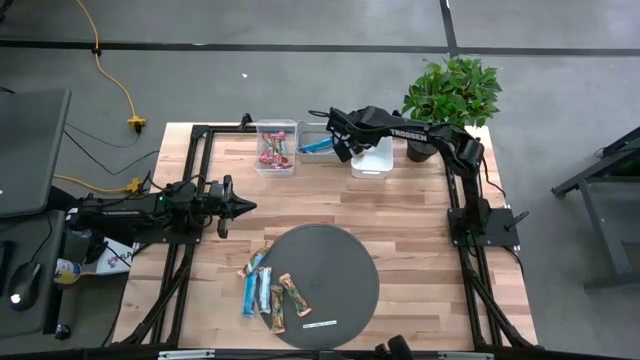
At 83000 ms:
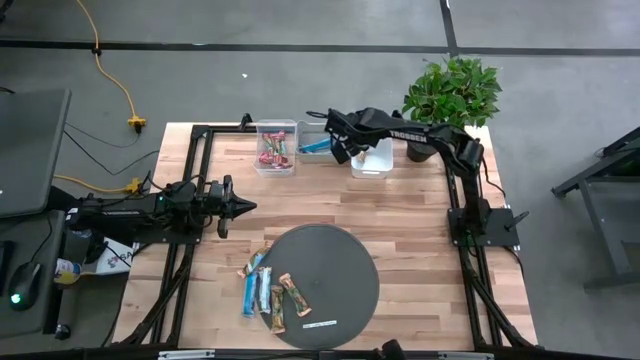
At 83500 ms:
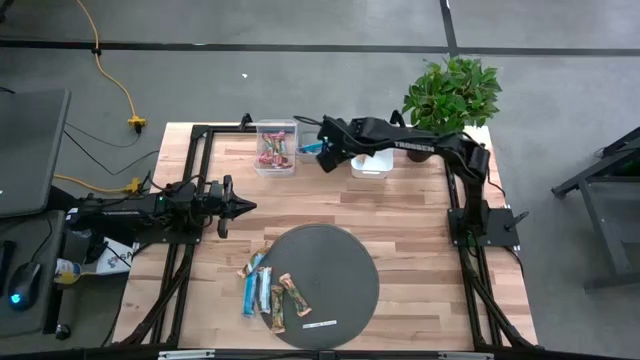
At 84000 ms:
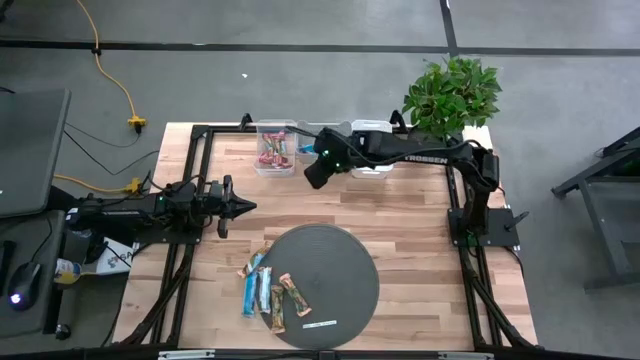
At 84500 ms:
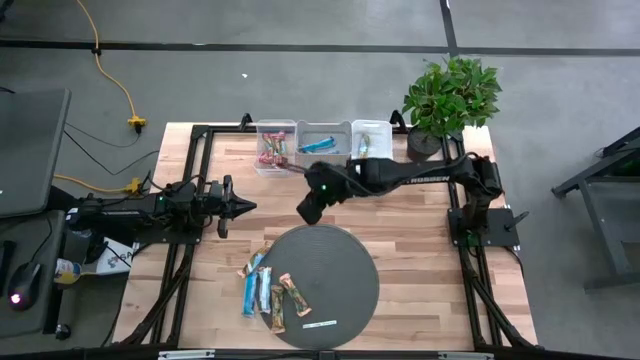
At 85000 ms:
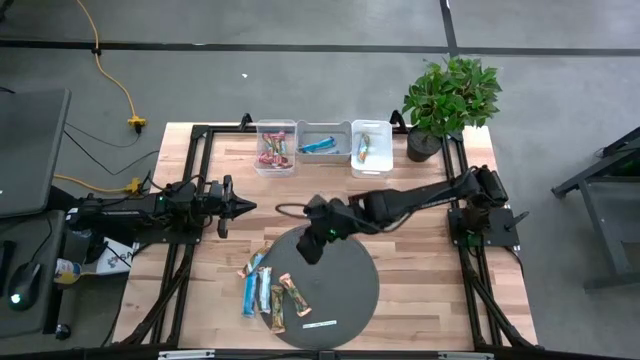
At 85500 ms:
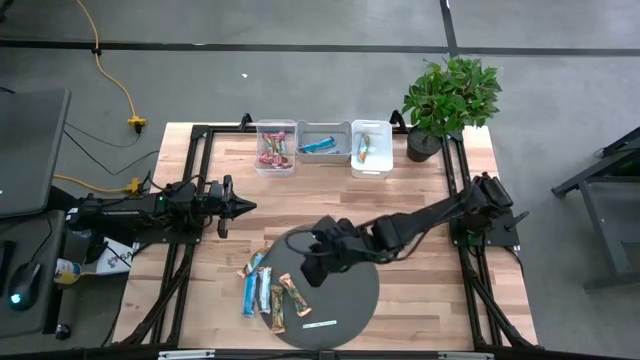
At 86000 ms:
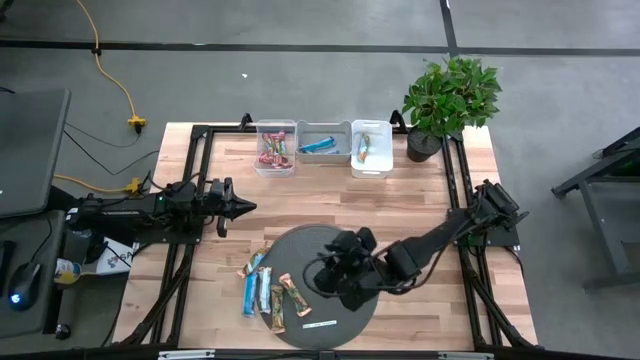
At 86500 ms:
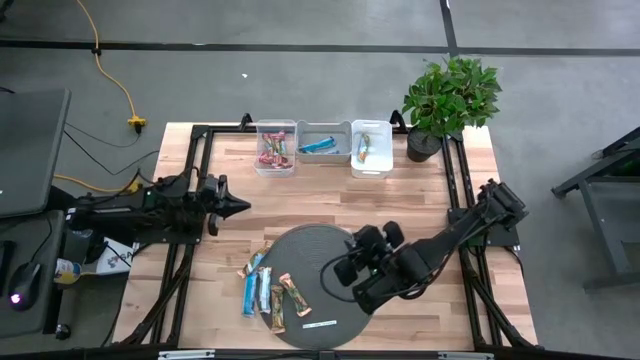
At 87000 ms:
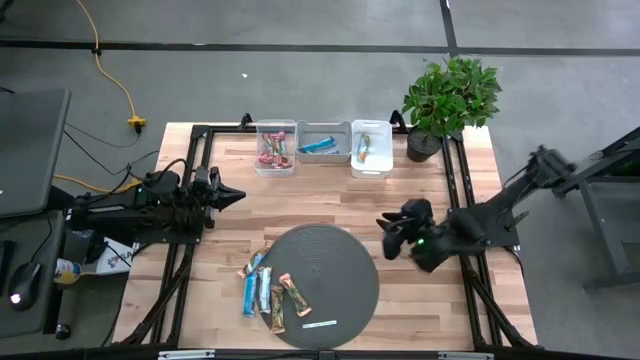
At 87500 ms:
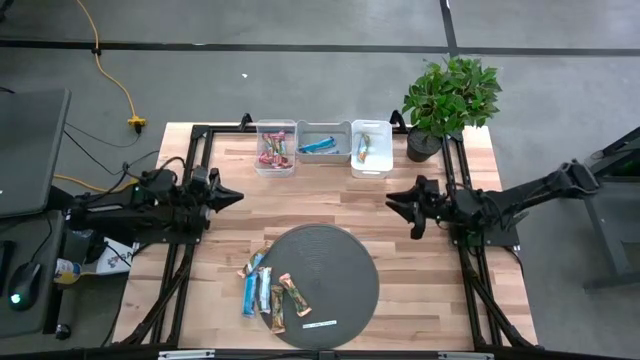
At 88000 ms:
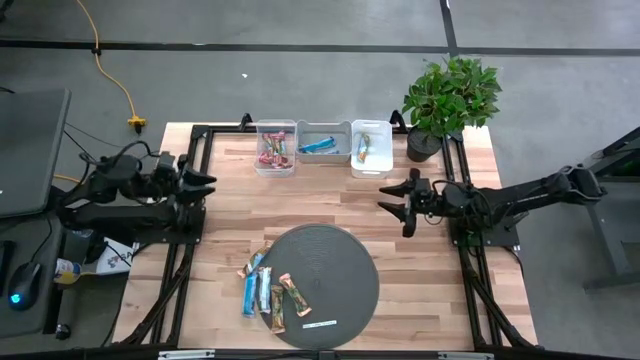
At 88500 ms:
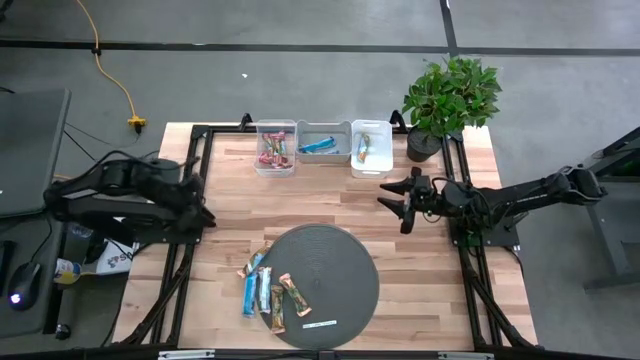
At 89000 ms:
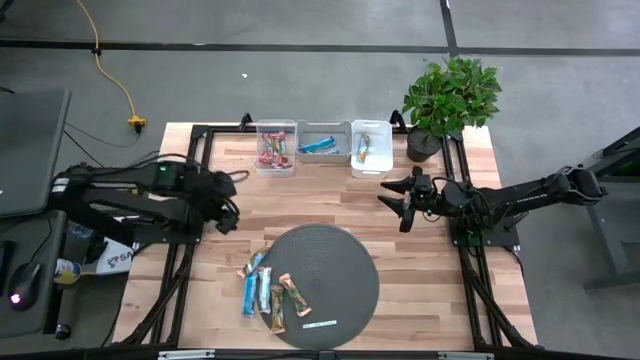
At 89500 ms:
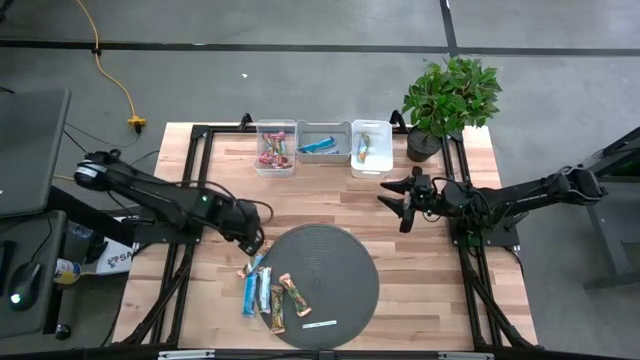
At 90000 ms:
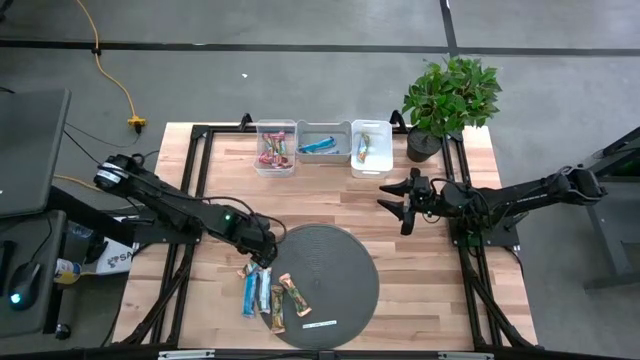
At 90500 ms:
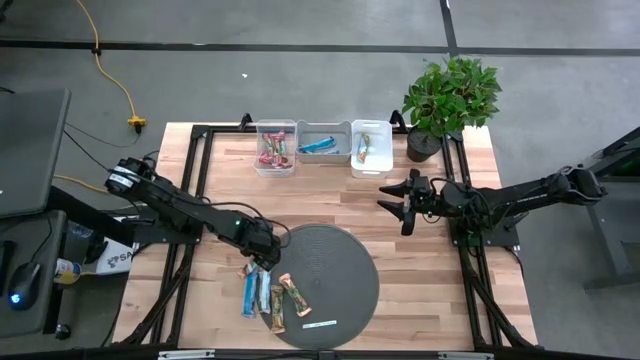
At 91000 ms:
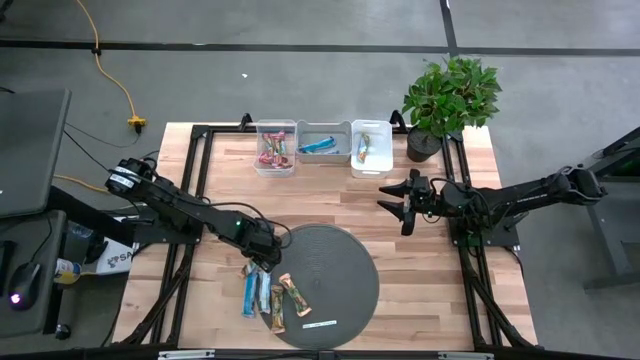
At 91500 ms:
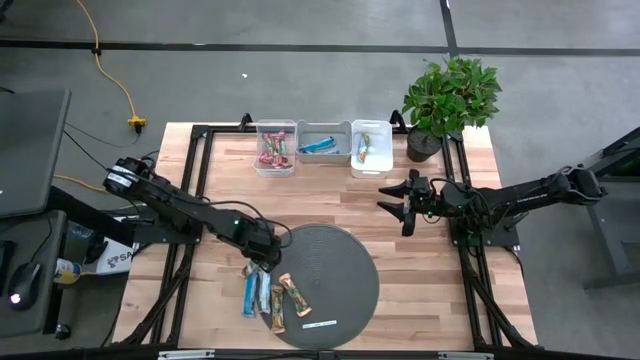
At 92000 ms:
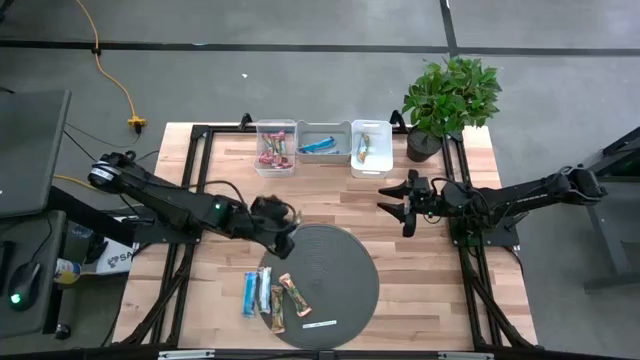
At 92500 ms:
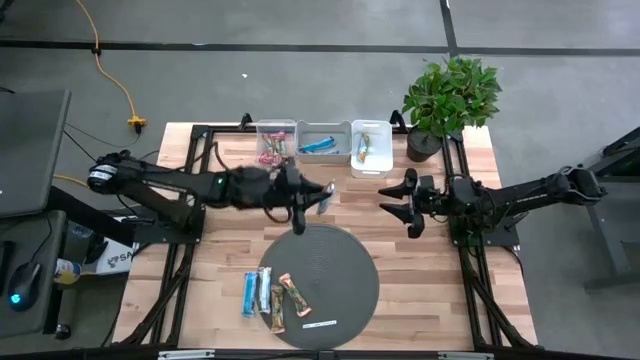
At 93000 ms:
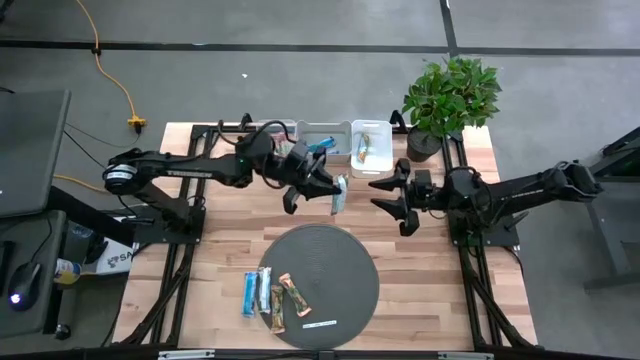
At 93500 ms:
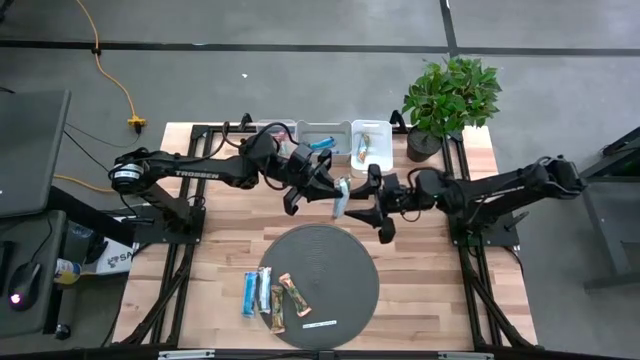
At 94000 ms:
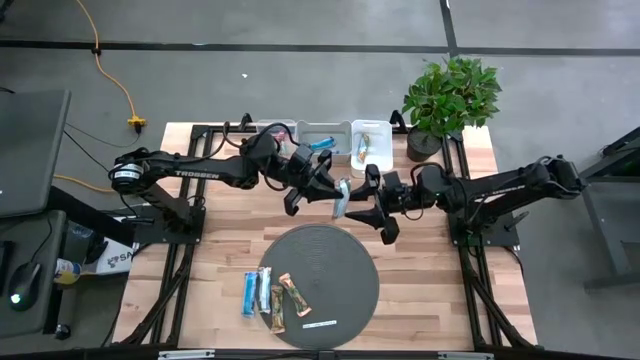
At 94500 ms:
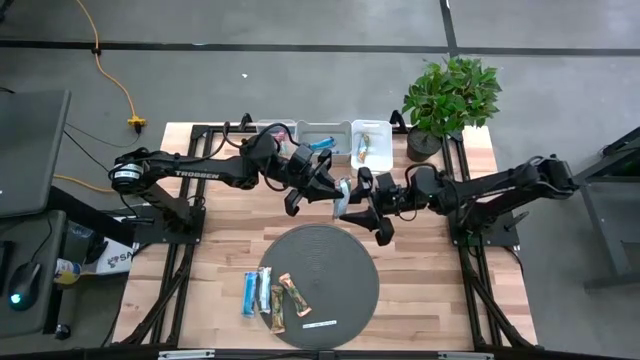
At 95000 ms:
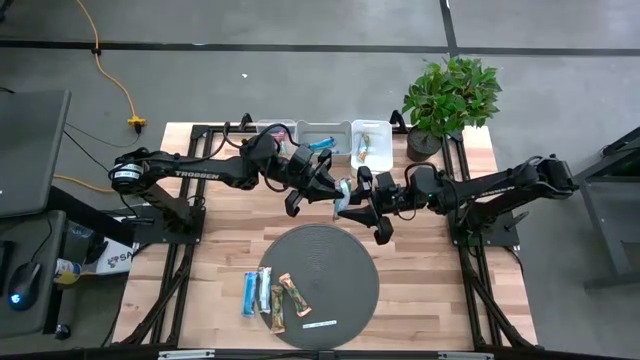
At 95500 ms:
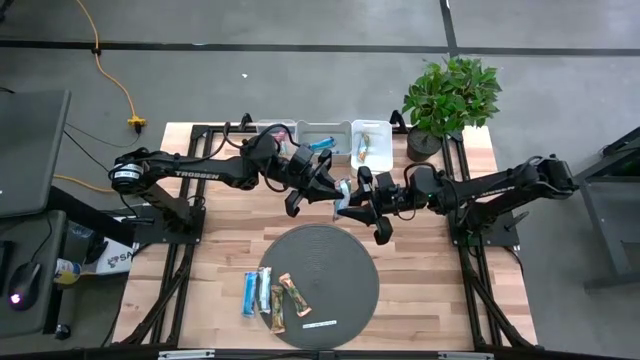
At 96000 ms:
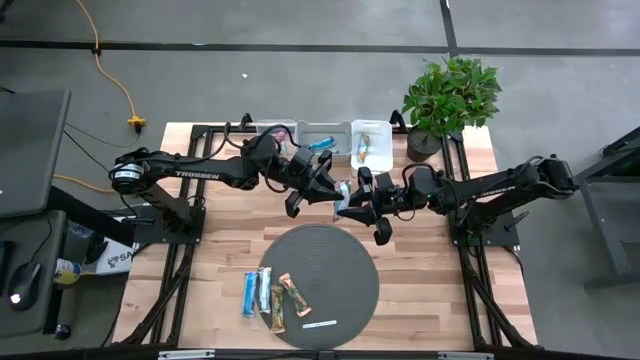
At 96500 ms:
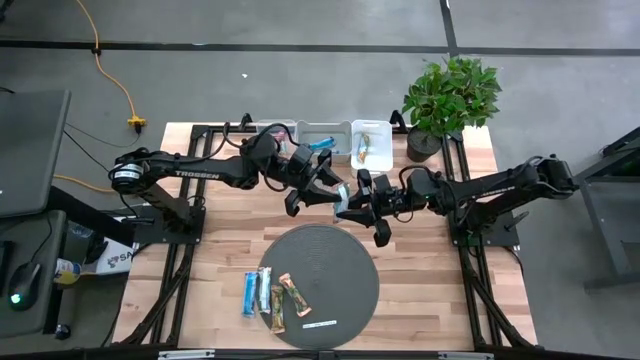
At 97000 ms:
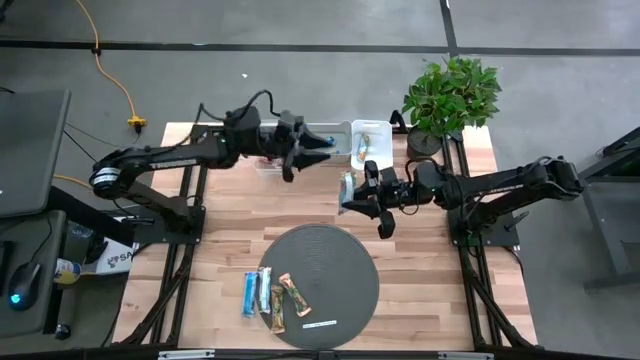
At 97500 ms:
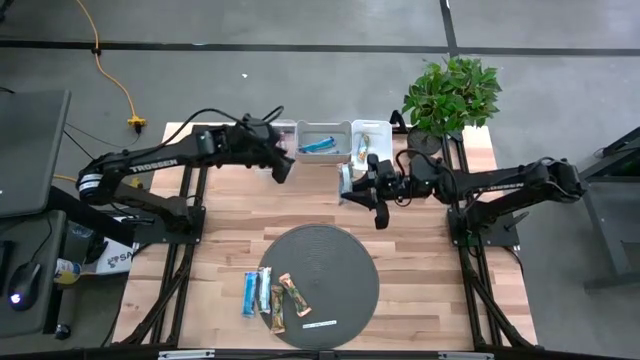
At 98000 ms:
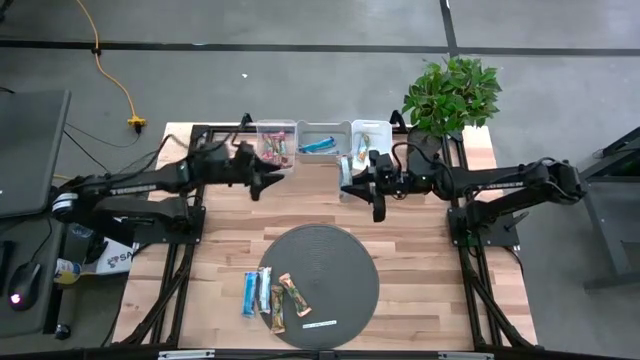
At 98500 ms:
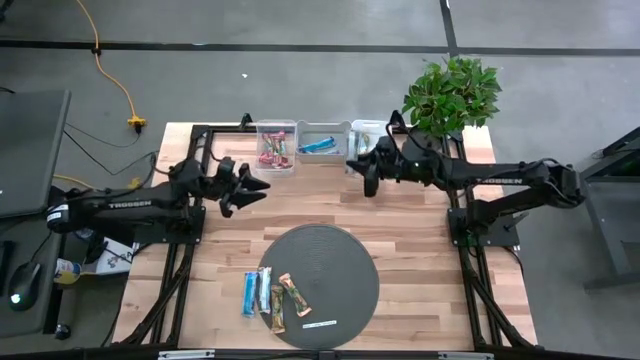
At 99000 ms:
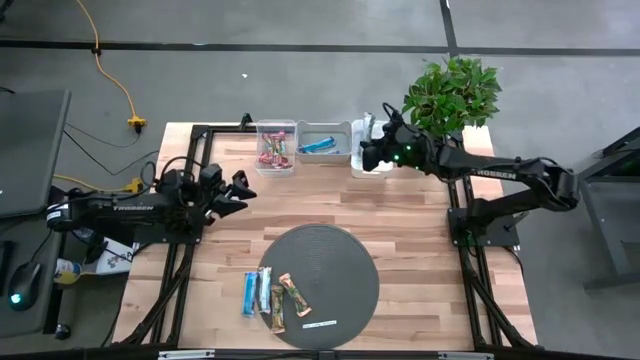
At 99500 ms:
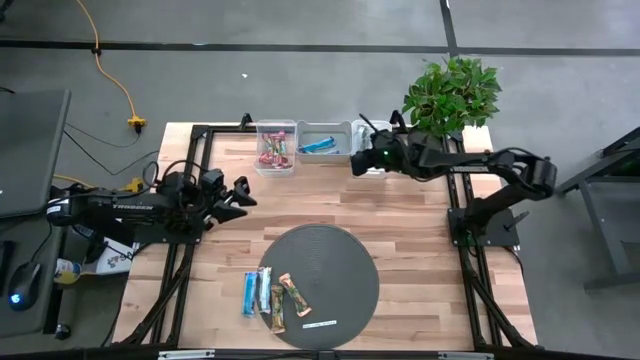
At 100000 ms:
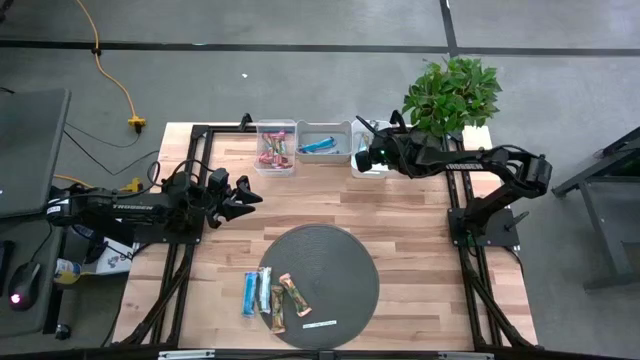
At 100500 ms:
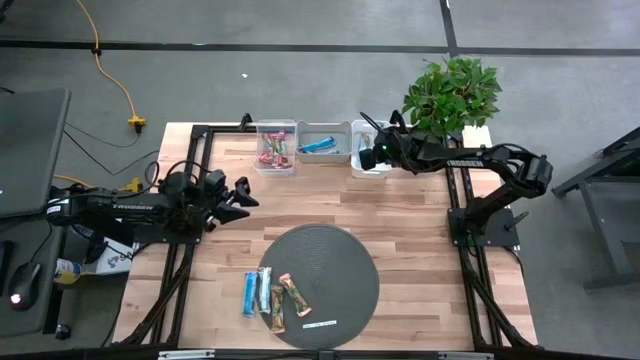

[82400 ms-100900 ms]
Task: Pick and place Granola Bars by type
Put the orange granola bar into the white bin

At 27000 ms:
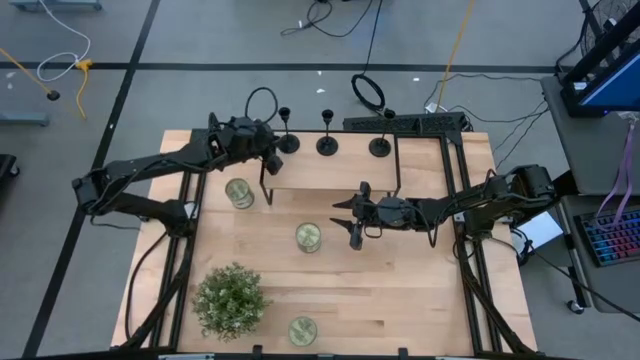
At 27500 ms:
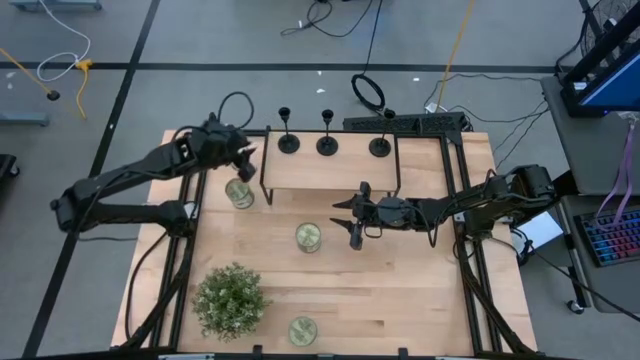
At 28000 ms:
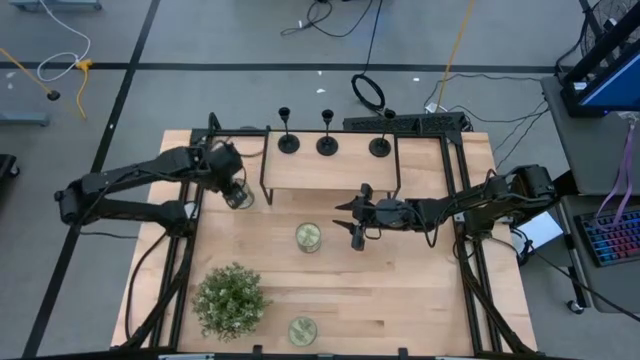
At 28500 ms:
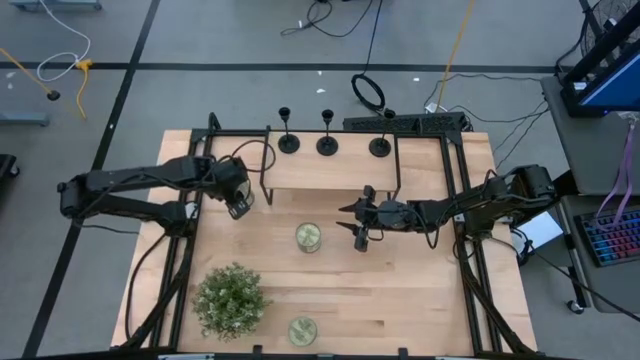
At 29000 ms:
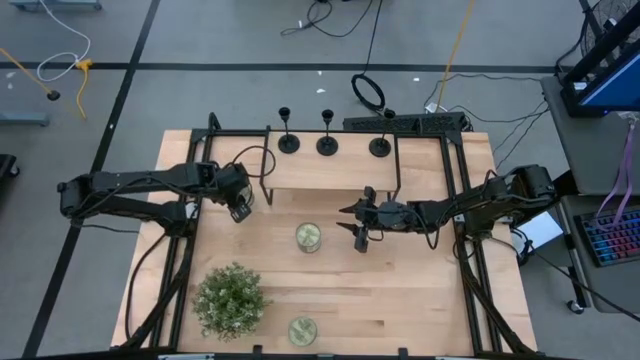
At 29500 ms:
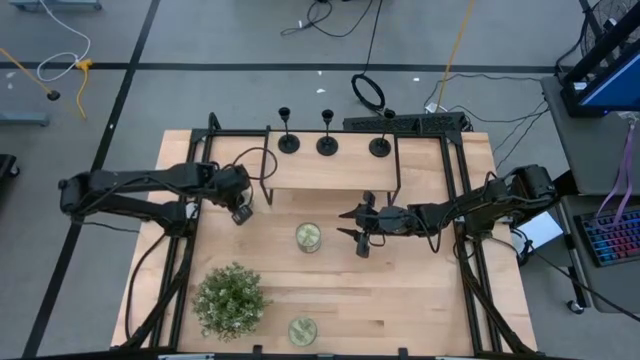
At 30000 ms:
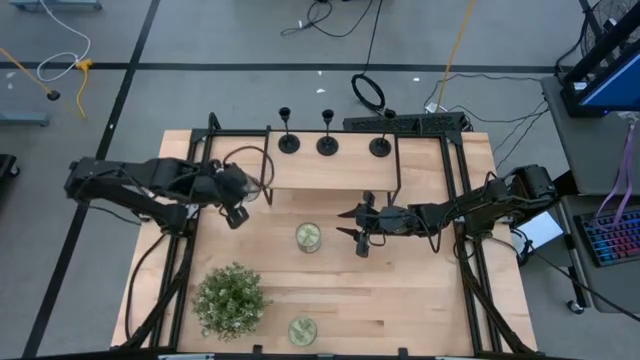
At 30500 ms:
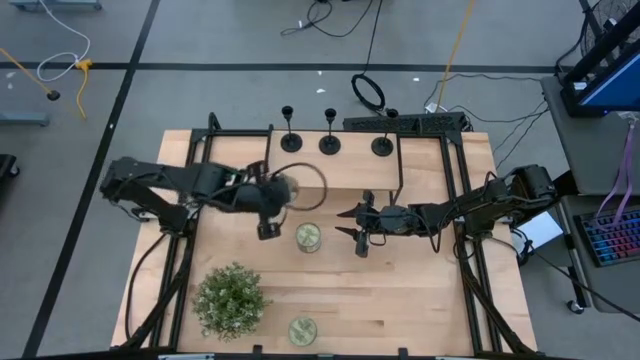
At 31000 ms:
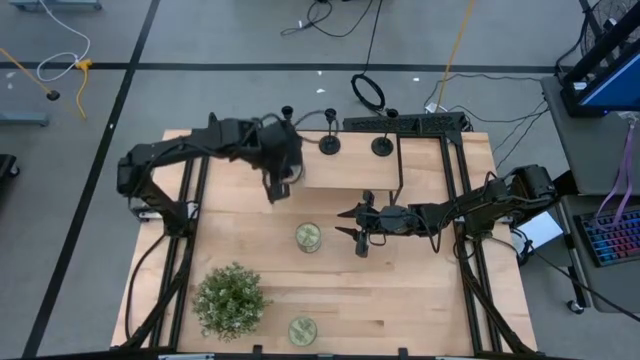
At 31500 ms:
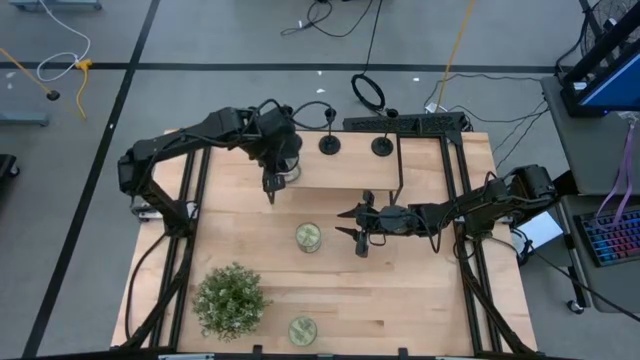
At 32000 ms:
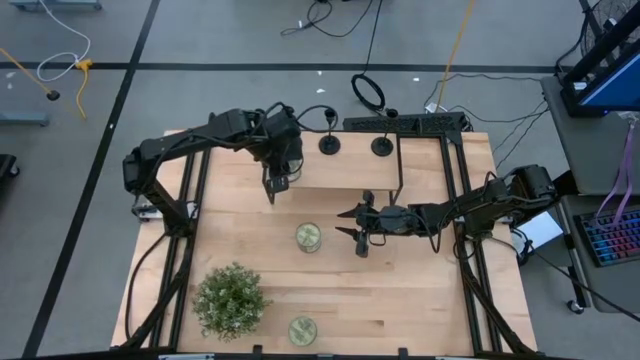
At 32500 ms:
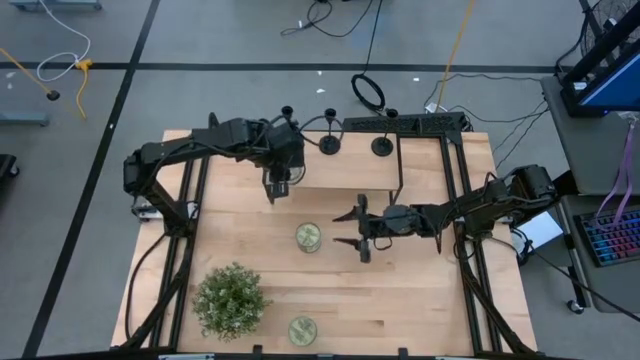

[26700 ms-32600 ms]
Task: Pick & Place candle stick holders
Put the top green scented candle on the shelf
